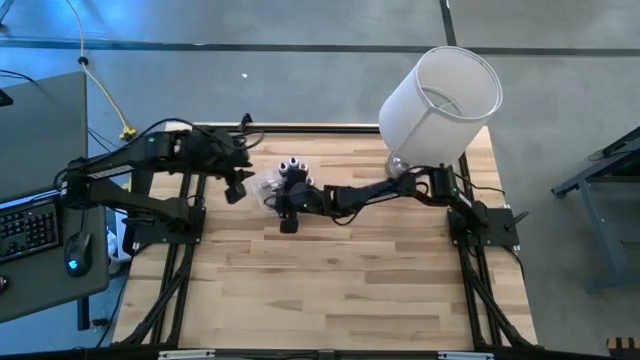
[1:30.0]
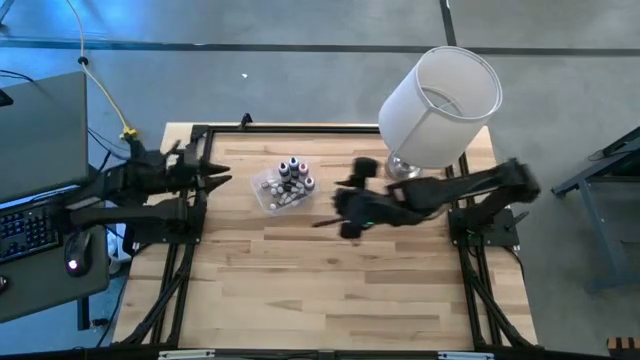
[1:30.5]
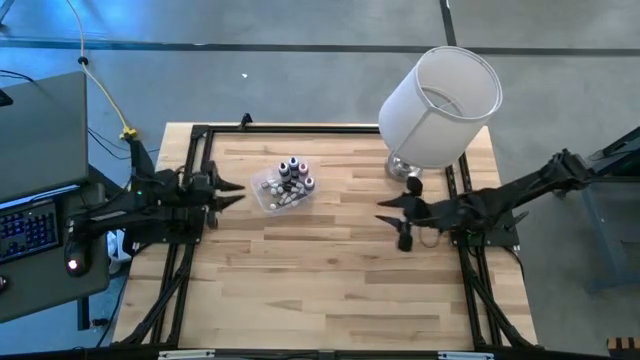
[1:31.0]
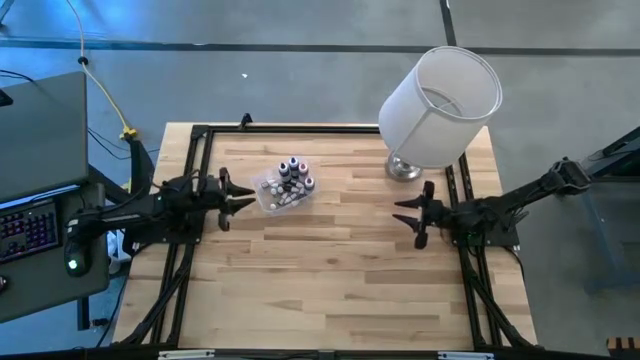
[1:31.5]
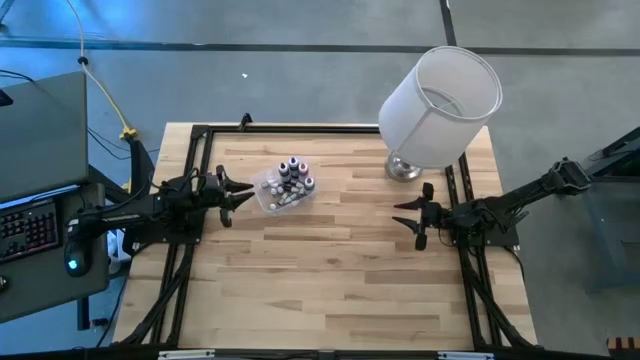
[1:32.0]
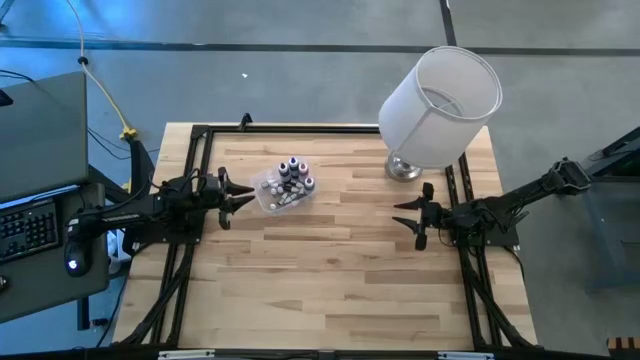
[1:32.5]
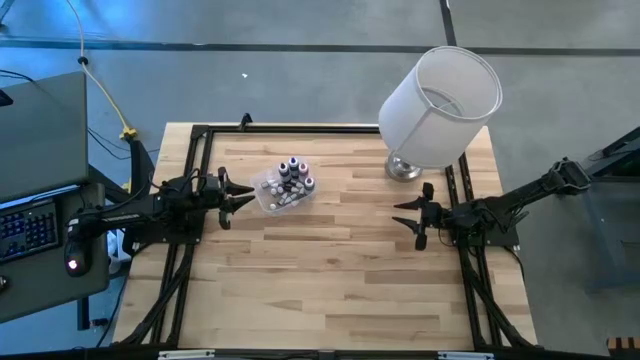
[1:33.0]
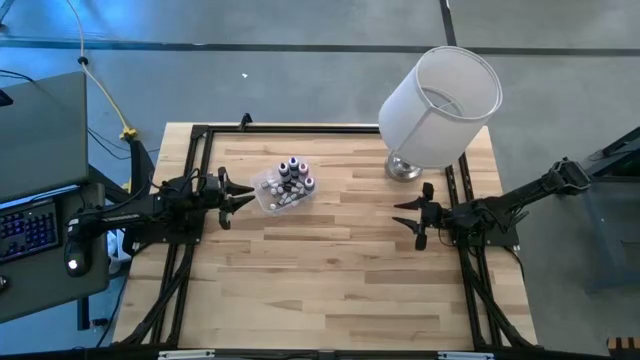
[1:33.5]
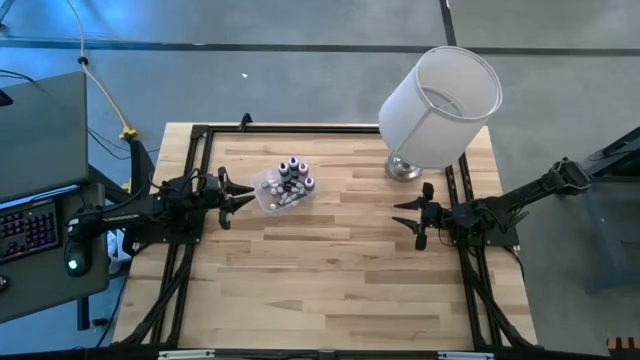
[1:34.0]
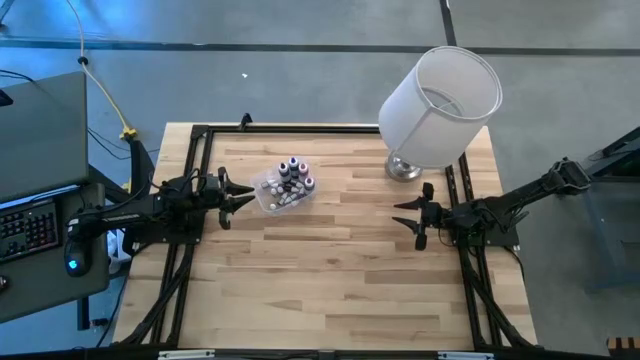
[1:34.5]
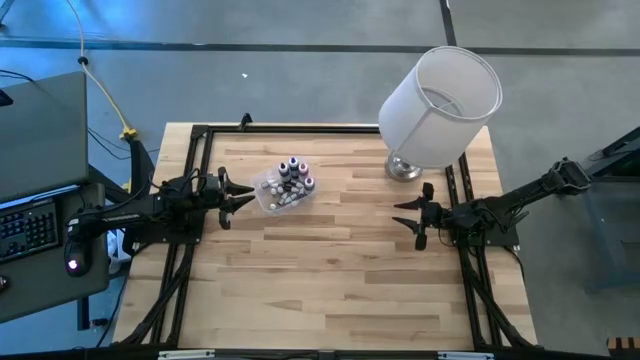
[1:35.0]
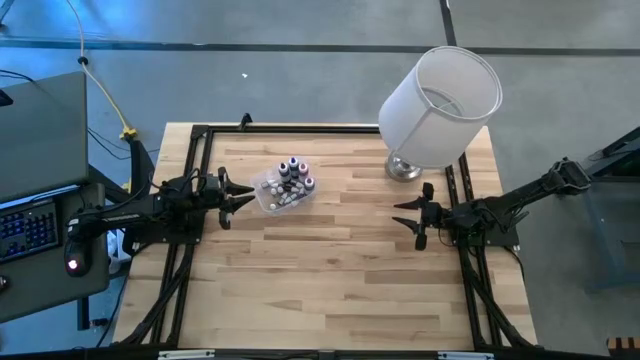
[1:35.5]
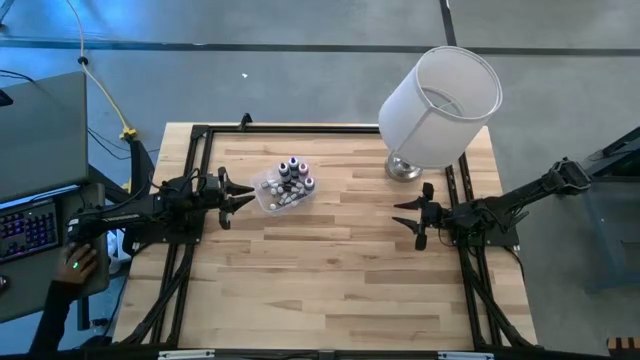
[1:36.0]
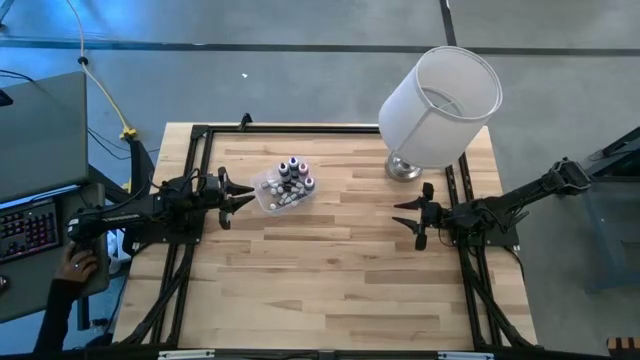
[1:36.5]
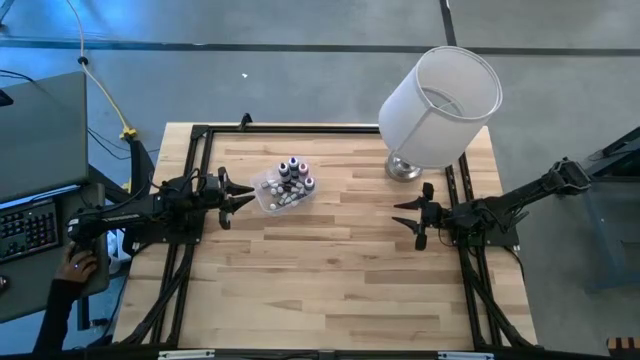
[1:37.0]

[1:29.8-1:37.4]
Task: Pick & Place food coloring
Return to Home Position

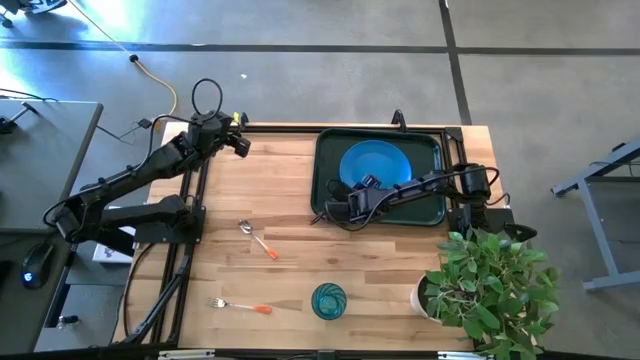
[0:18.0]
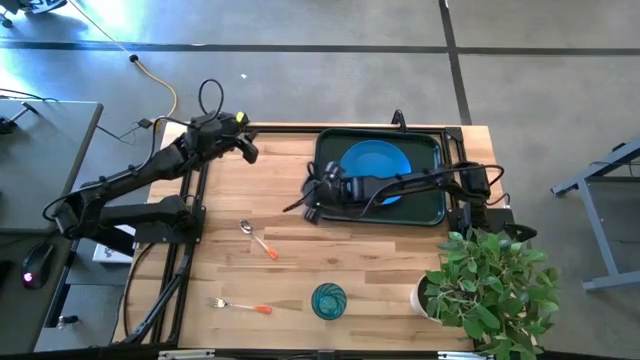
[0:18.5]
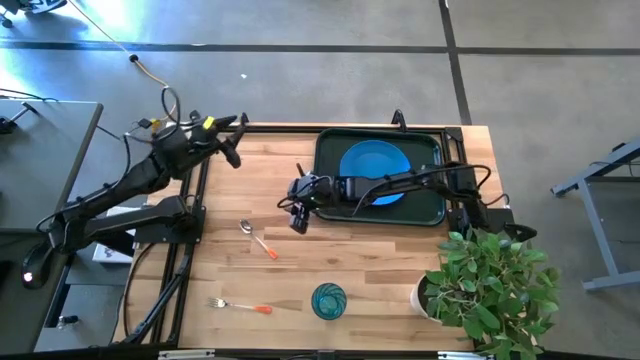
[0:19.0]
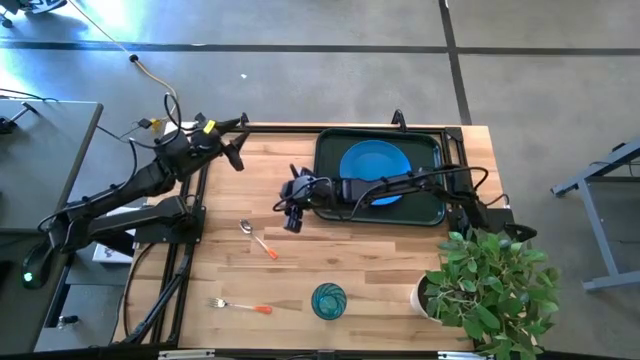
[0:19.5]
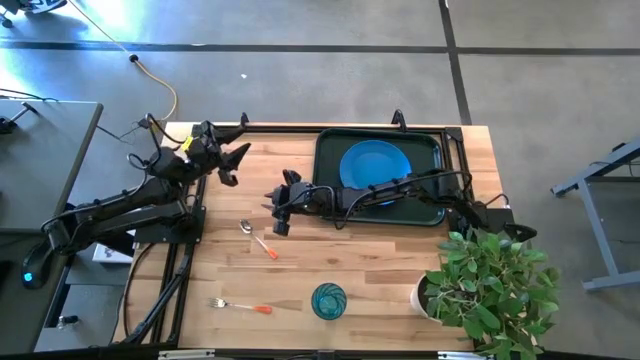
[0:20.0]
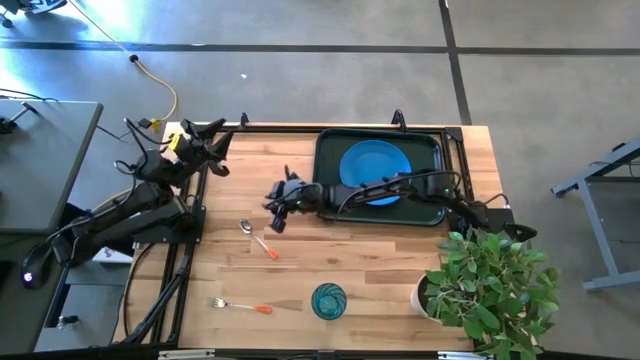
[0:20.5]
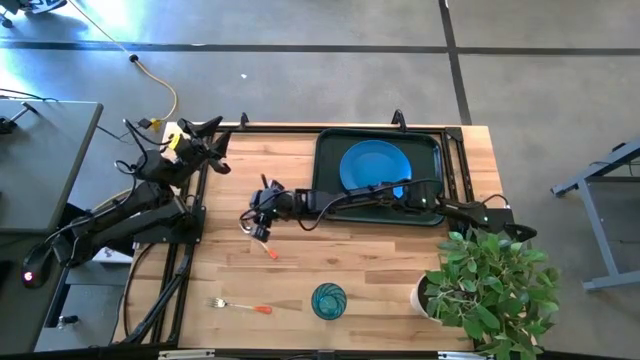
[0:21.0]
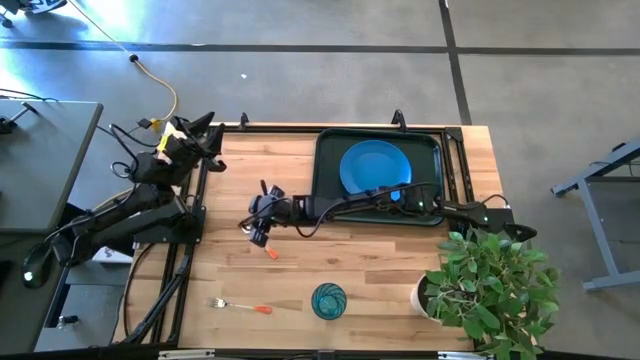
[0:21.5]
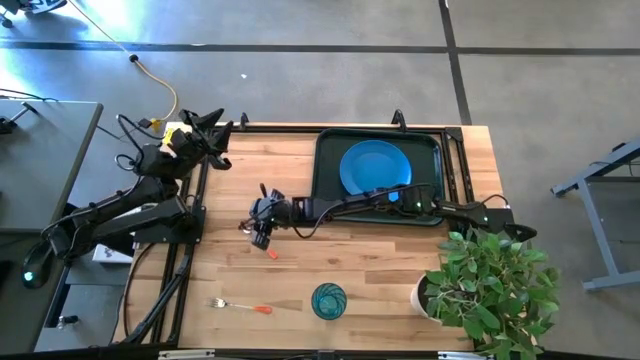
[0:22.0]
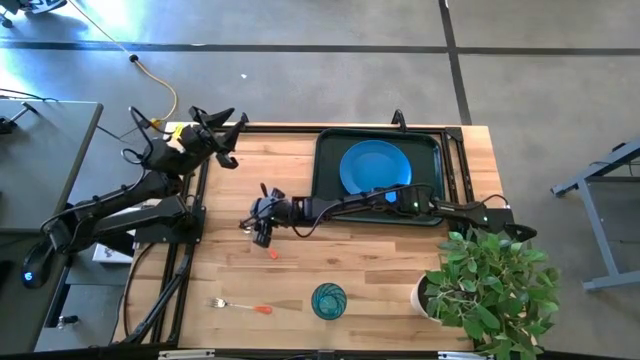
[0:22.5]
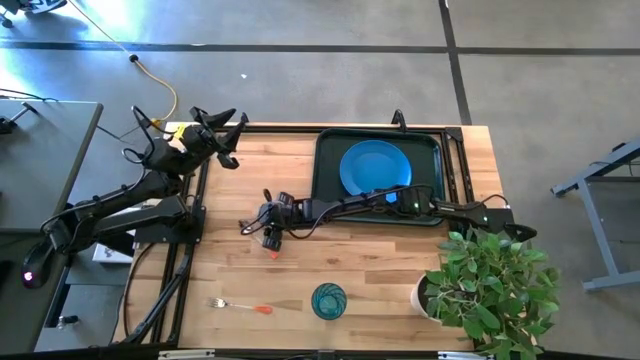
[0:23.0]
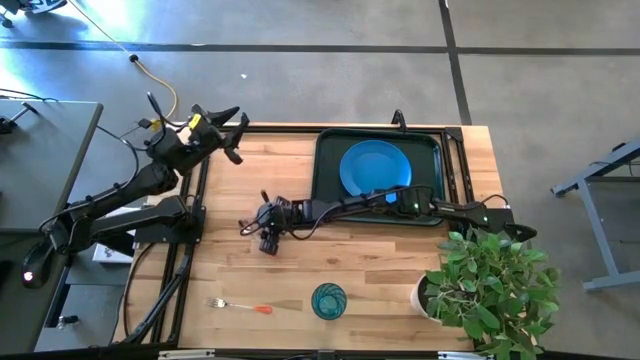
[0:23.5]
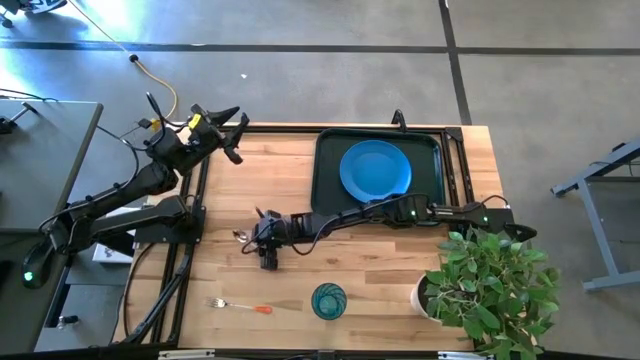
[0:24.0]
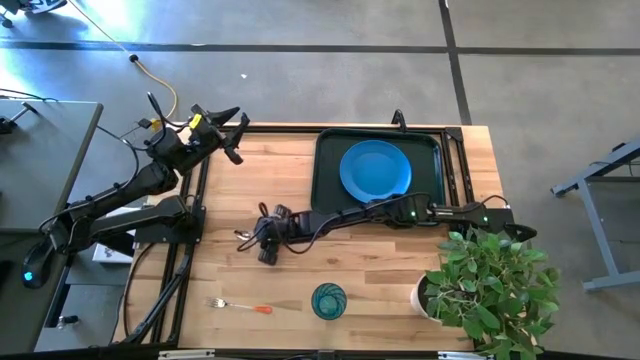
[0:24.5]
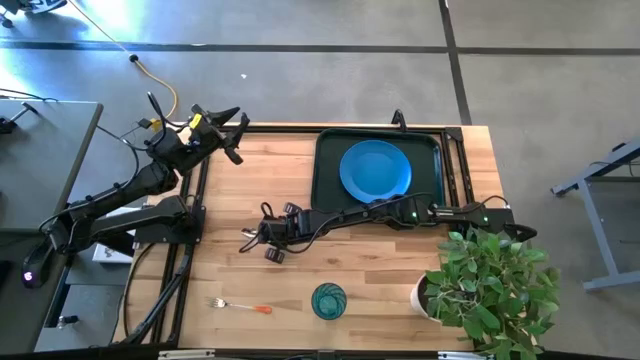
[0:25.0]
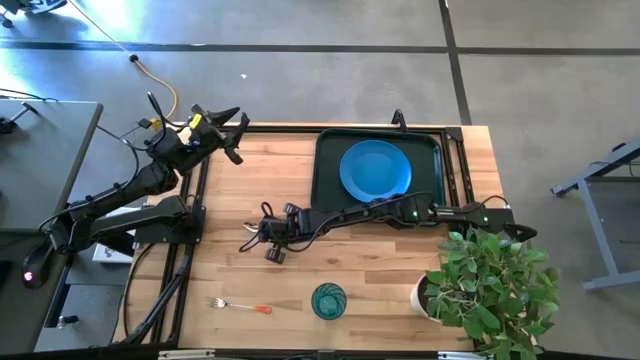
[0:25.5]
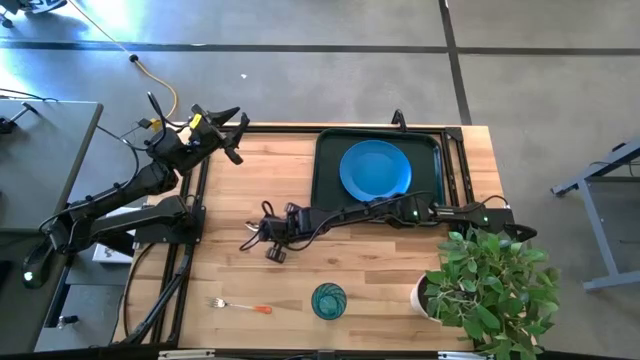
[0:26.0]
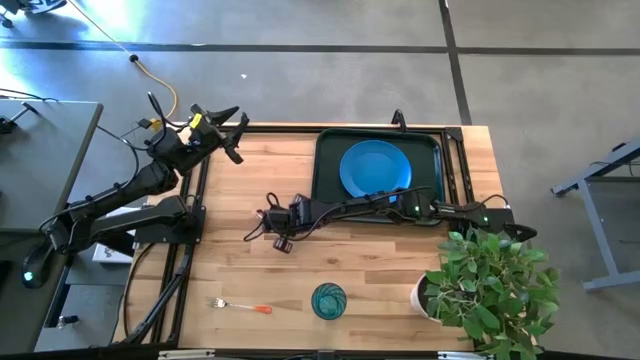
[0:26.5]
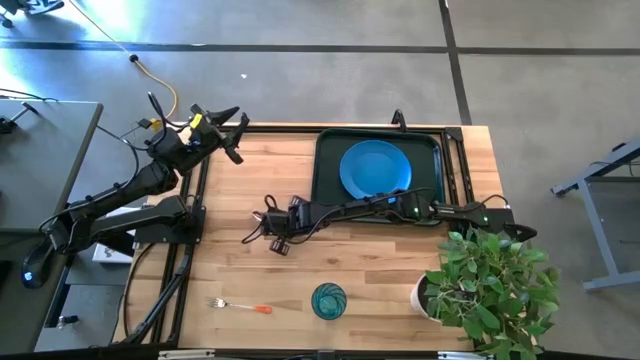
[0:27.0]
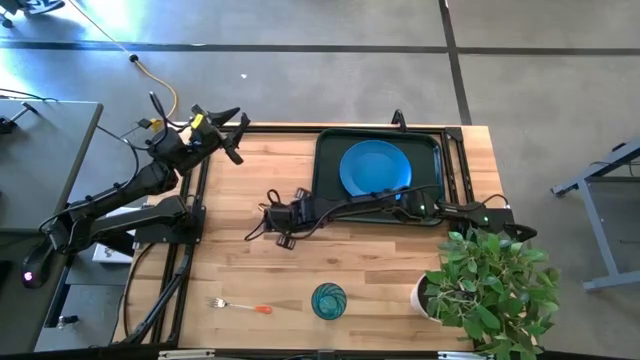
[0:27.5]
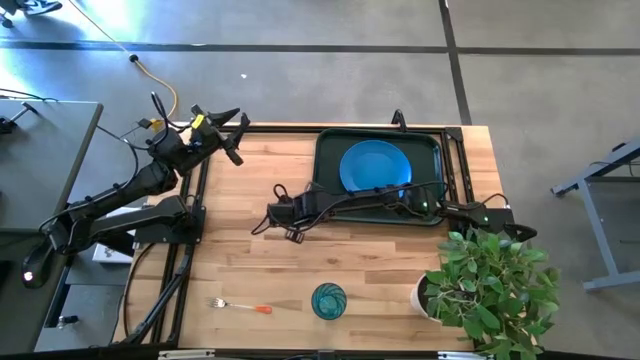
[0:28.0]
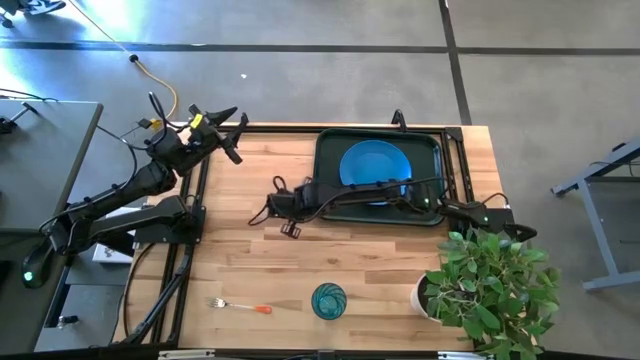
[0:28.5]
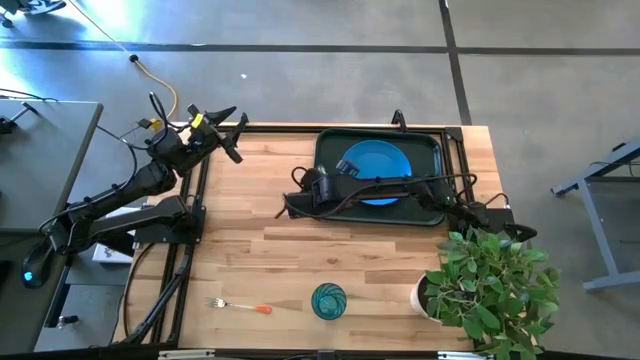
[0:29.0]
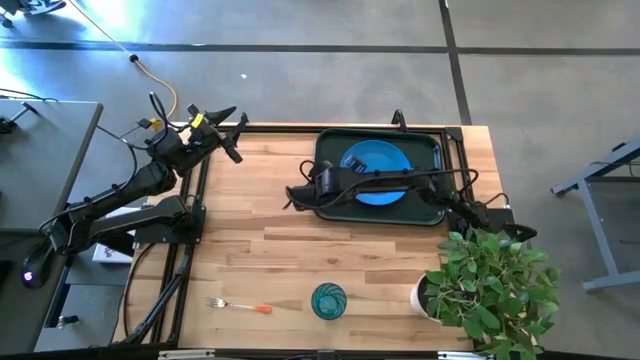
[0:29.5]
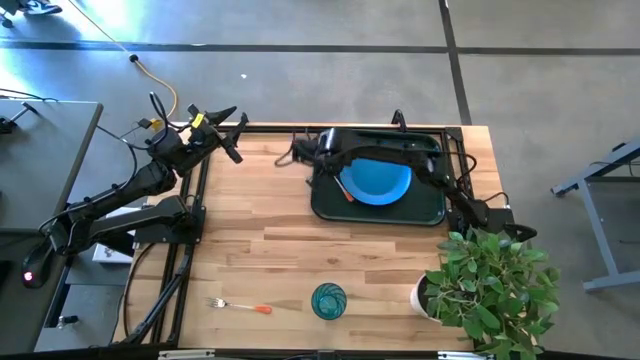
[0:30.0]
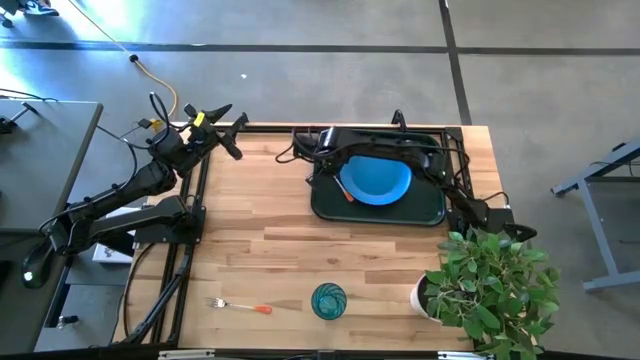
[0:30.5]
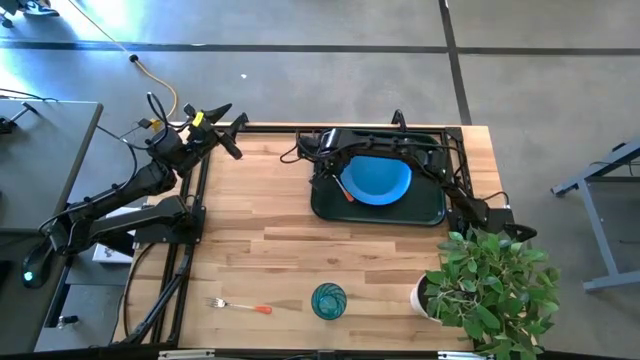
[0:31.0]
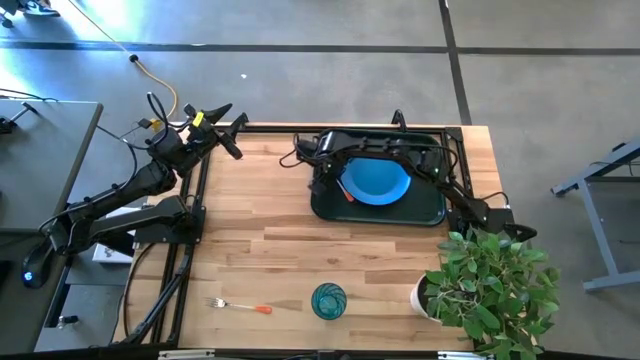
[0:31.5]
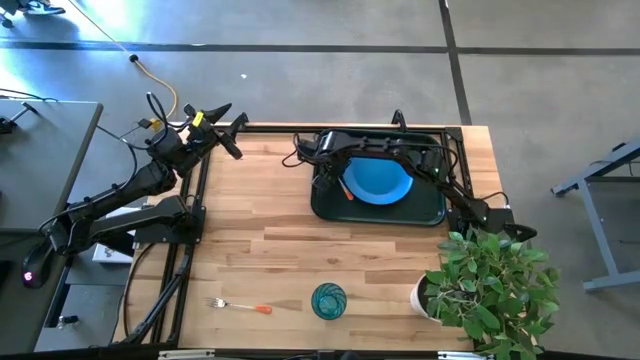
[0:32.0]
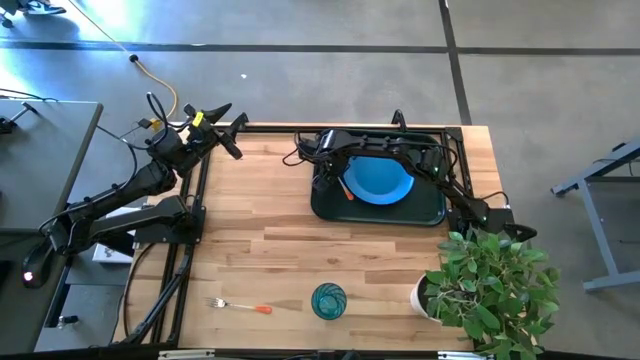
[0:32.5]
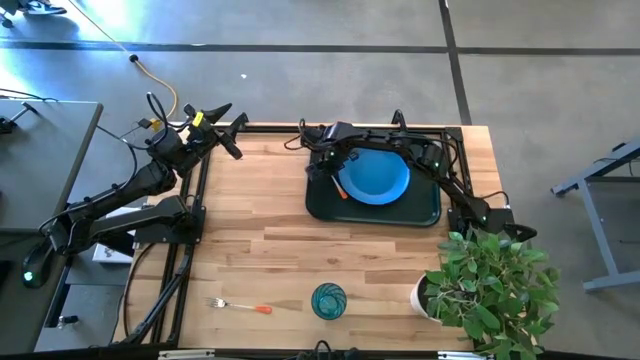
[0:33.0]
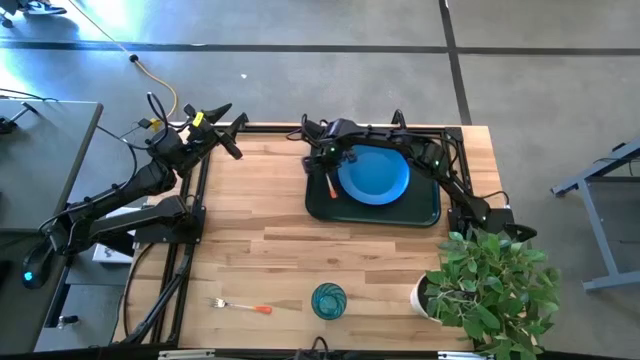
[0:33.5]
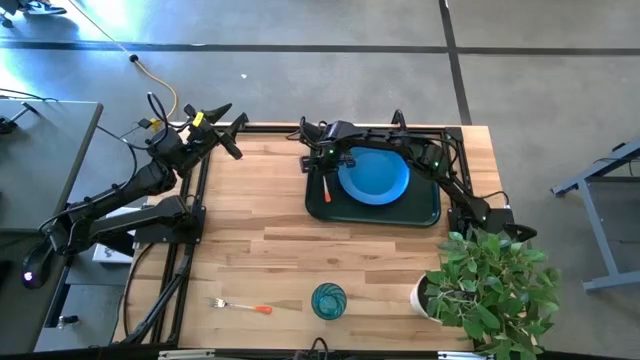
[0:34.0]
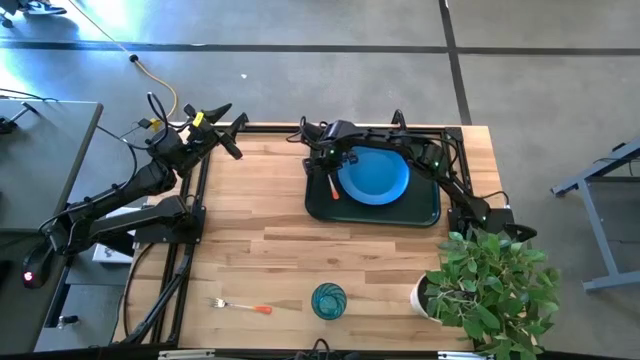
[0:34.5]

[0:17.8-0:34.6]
Task: Pick and place plate/cup/fork/spoon on tray
Put the orange spoon on the green serving tray to the left of the blue plate
